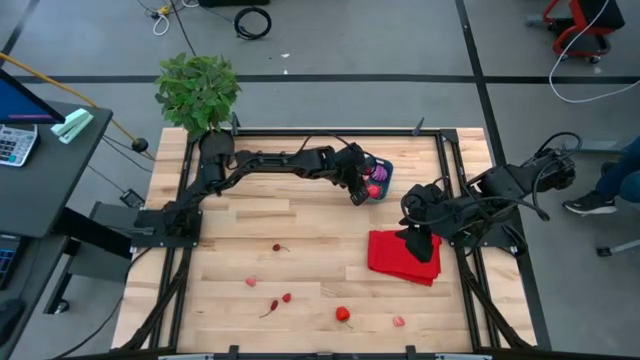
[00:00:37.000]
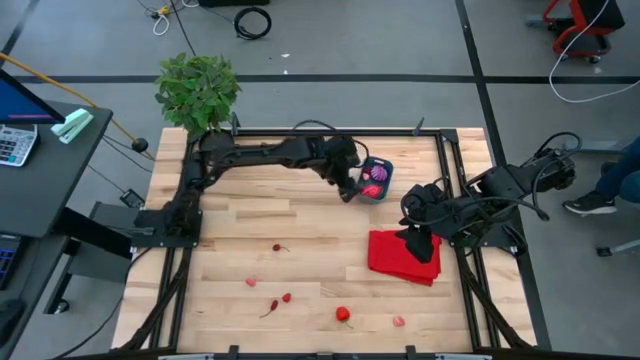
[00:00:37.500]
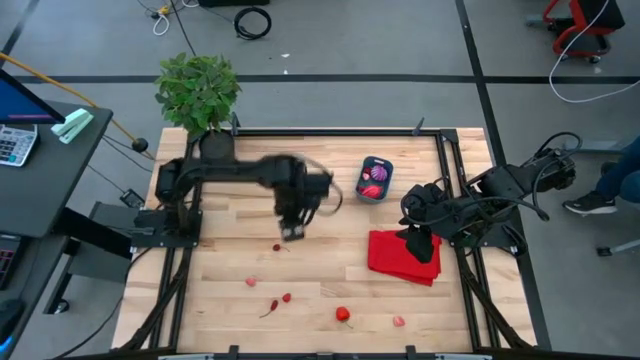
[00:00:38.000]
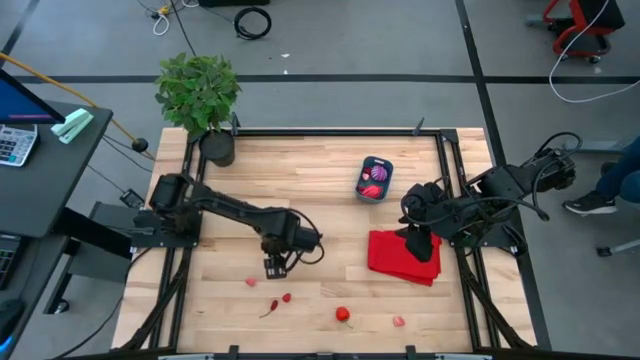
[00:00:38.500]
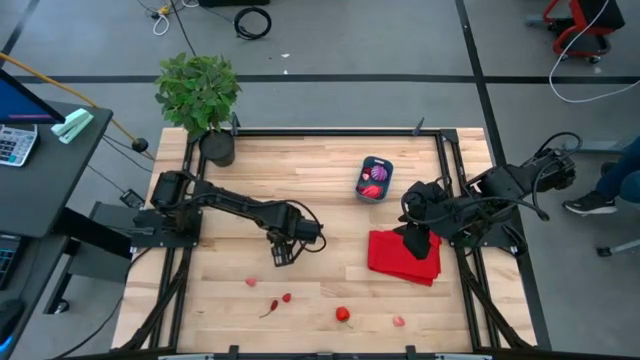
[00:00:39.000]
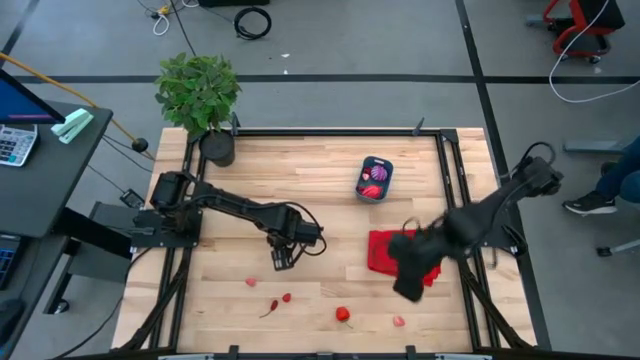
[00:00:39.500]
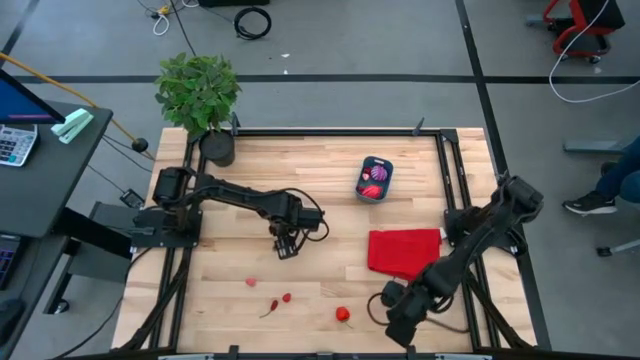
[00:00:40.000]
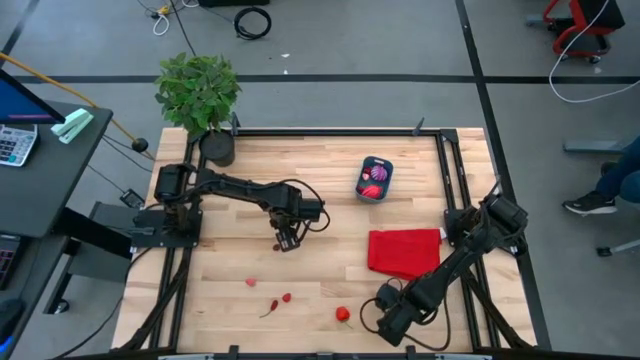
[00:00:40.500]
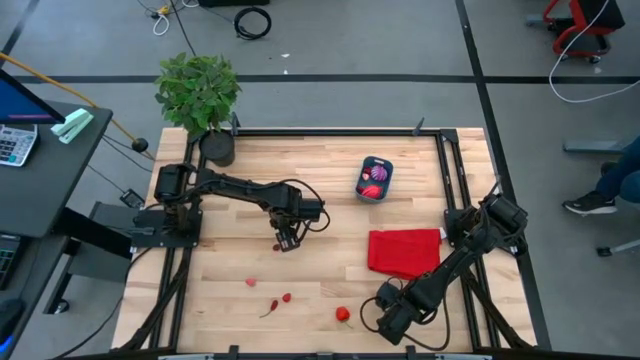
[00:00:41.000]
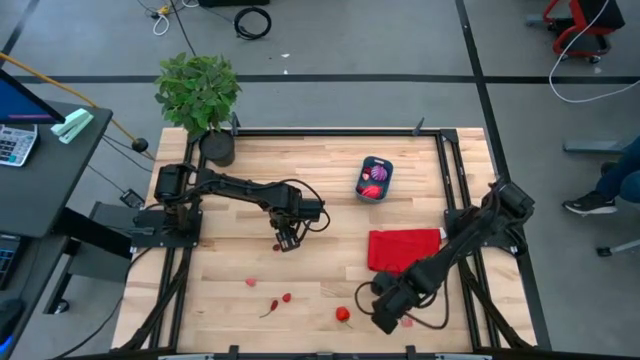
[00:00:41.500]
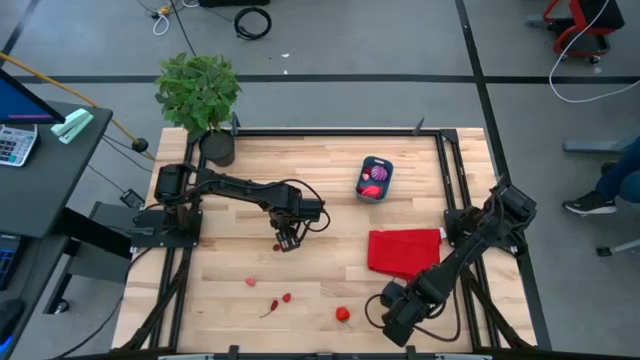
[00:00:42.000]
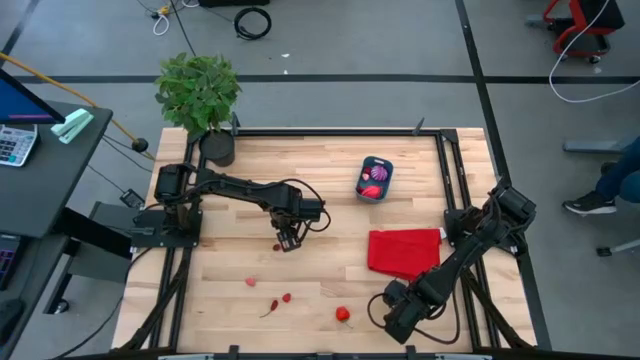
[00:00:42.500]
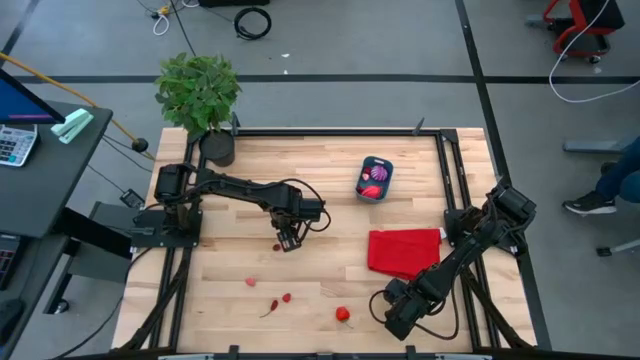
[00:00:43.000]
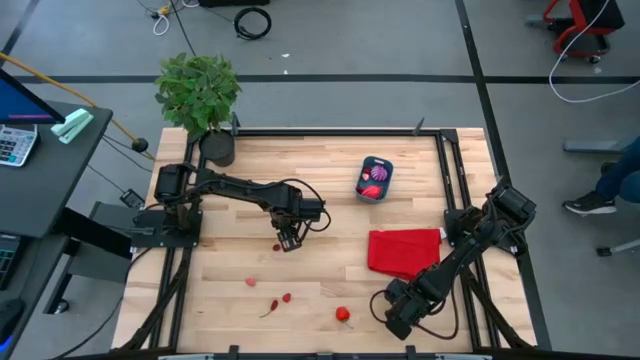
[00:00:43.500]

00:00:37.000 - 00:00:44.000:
Task: Pick and placing Produce into tupperware
Put the peach into the bin

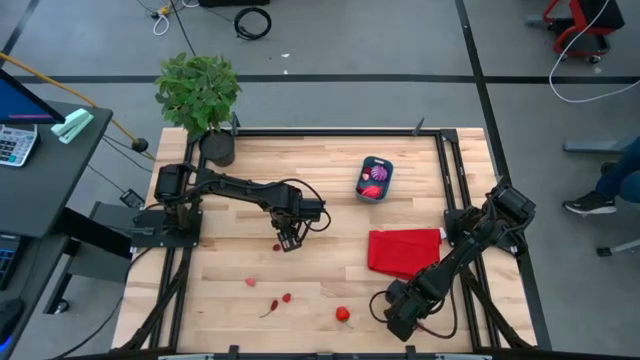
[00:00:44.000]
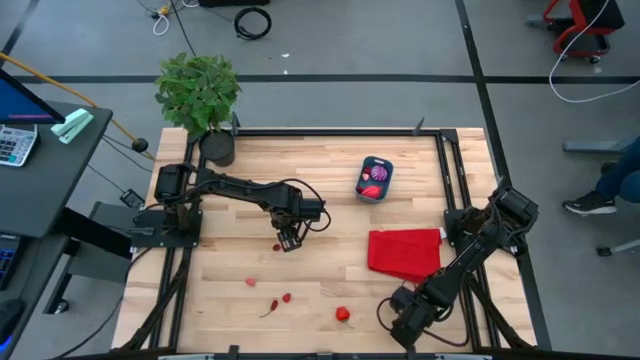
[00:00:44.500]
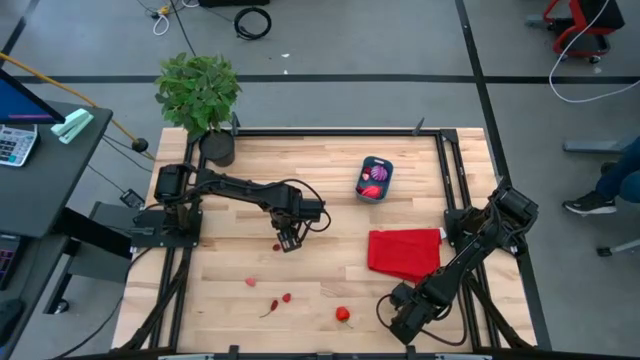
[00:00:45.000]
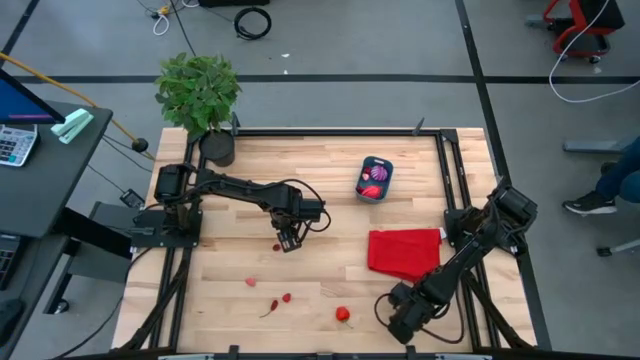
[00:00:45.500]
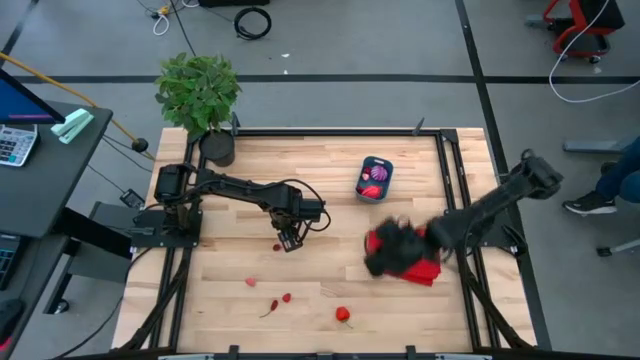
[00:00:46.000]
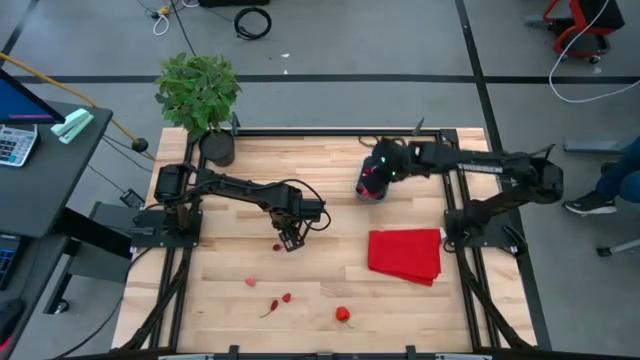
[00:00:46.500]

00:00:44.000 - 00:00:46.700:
Put the peach into the bin

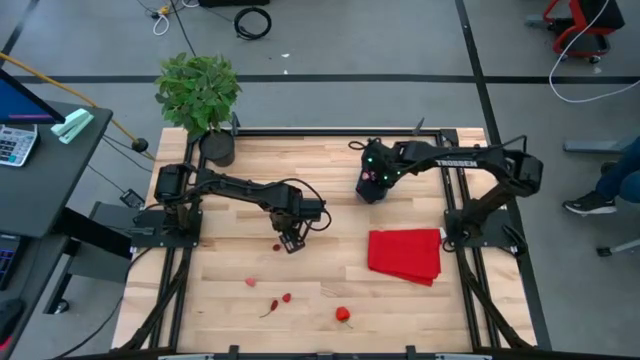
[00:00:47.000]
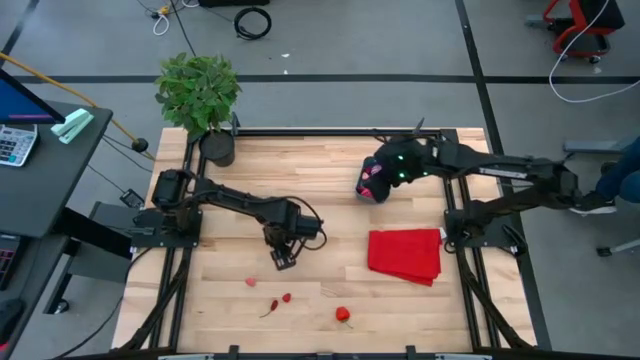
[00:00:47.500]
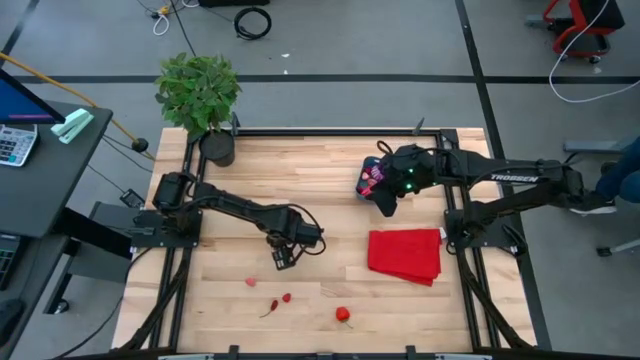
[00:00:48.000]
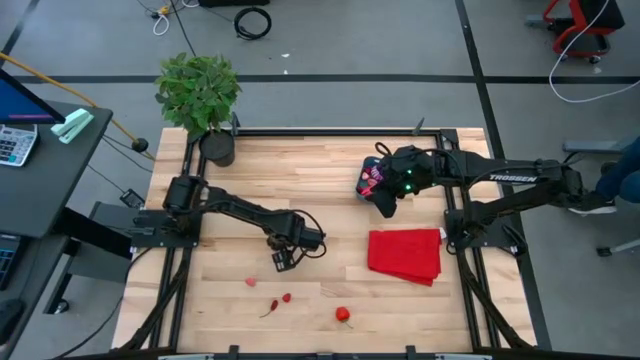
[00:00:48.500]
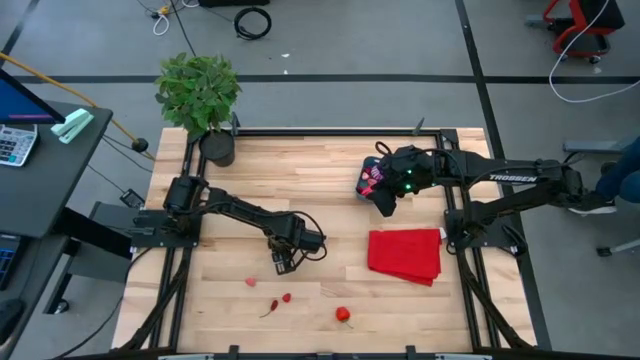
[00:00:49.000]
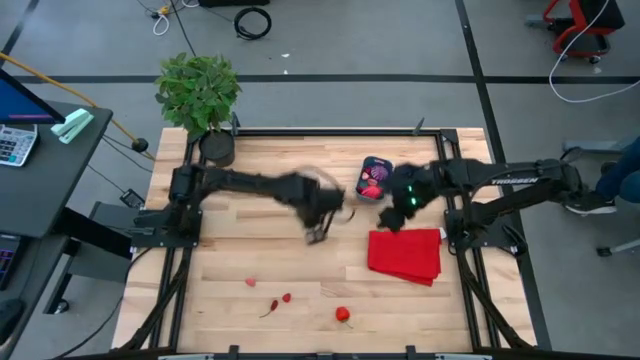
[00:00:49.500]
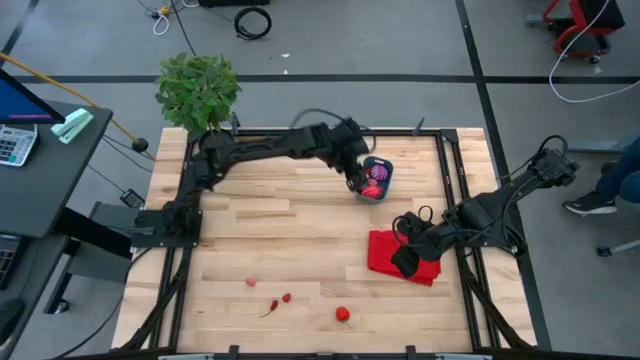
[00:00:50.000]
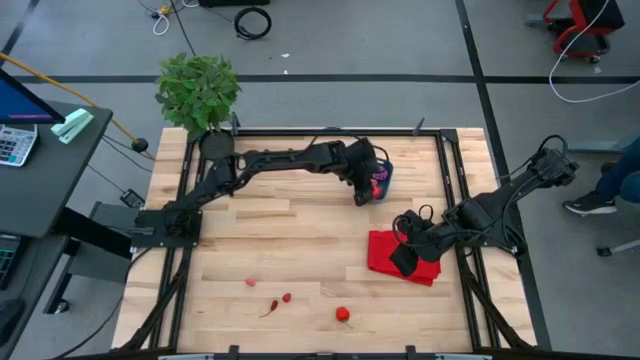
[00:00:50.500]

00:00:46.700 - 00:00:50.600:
Put the berry into the bin

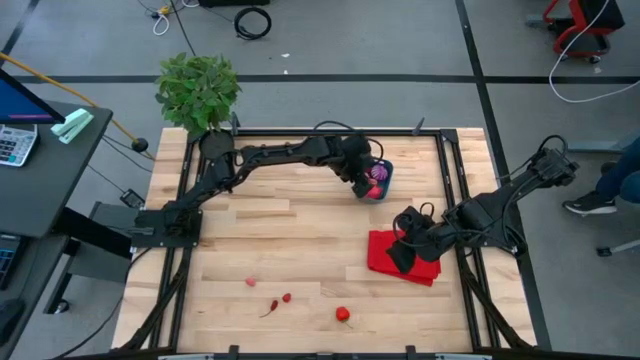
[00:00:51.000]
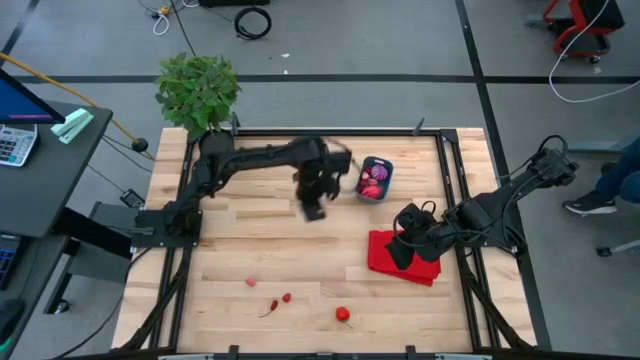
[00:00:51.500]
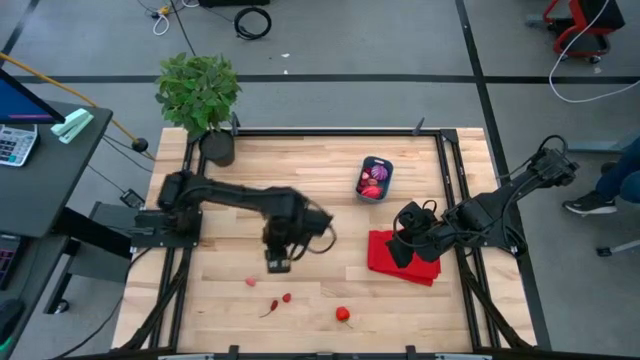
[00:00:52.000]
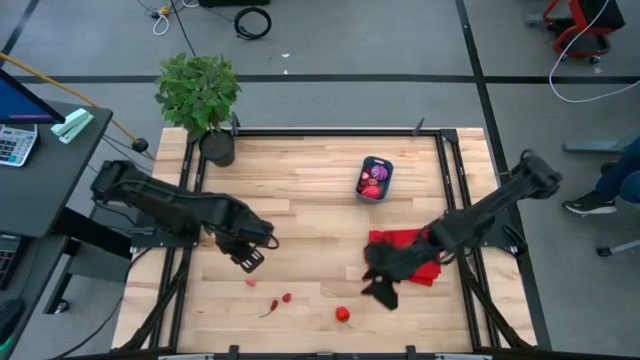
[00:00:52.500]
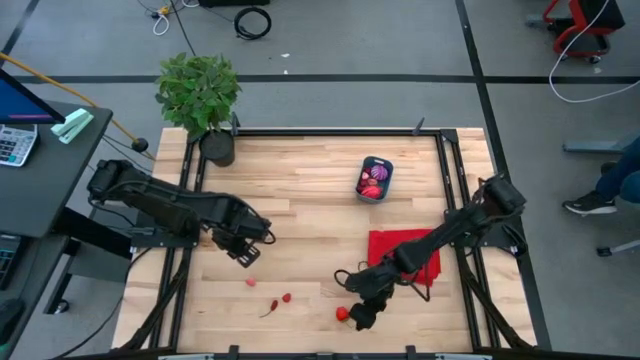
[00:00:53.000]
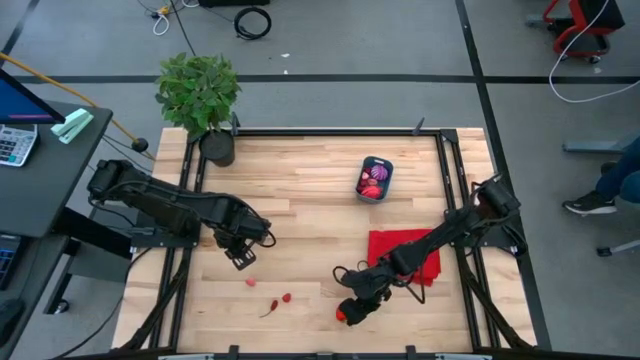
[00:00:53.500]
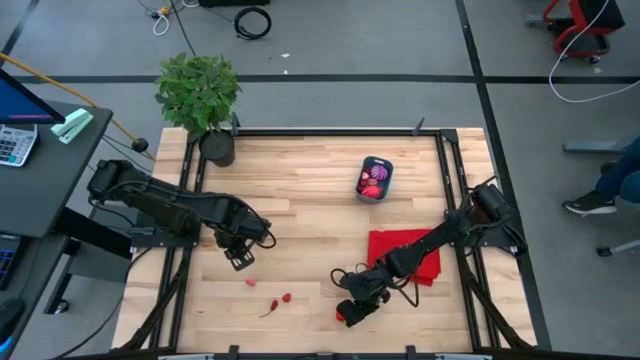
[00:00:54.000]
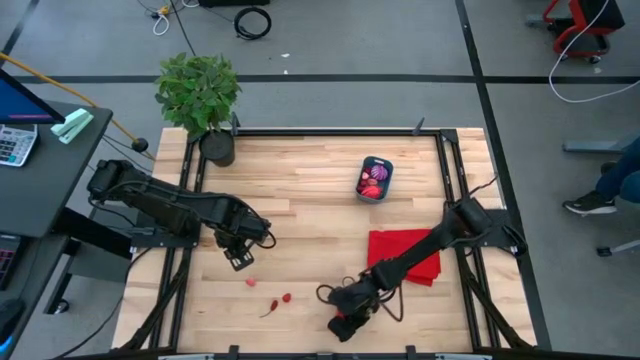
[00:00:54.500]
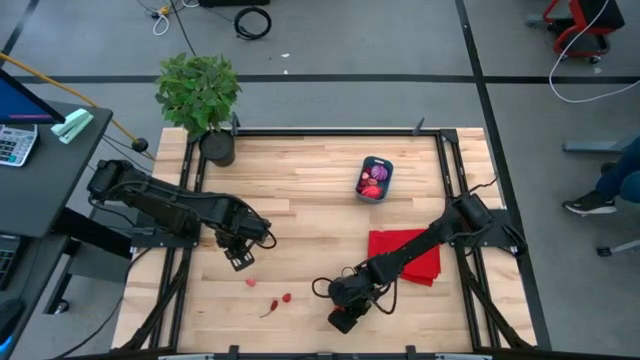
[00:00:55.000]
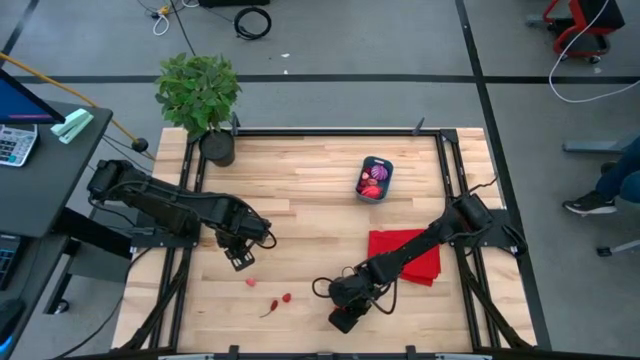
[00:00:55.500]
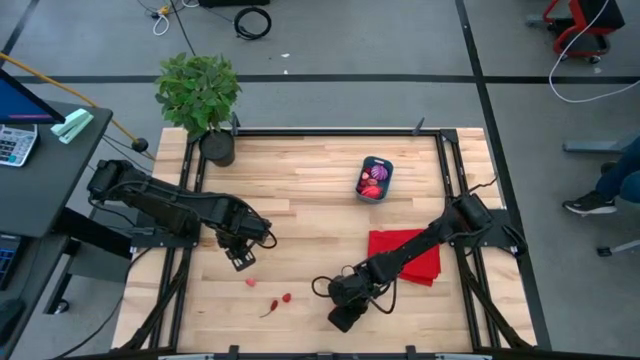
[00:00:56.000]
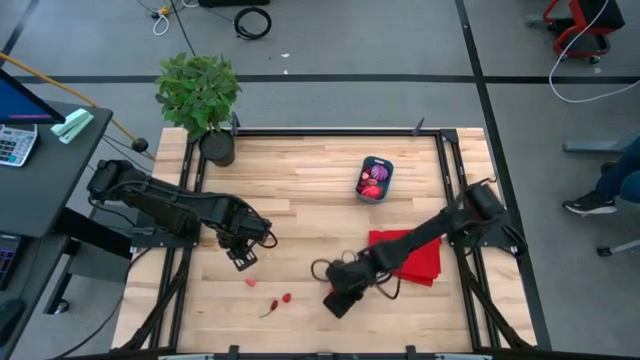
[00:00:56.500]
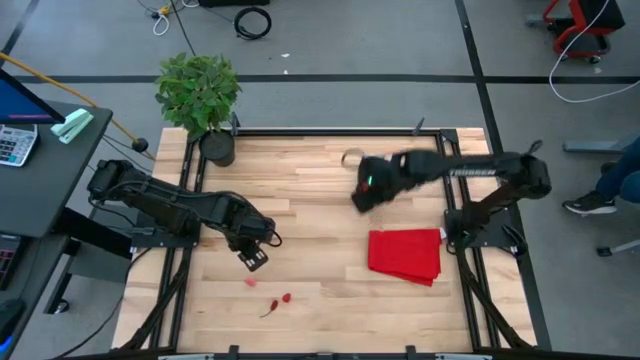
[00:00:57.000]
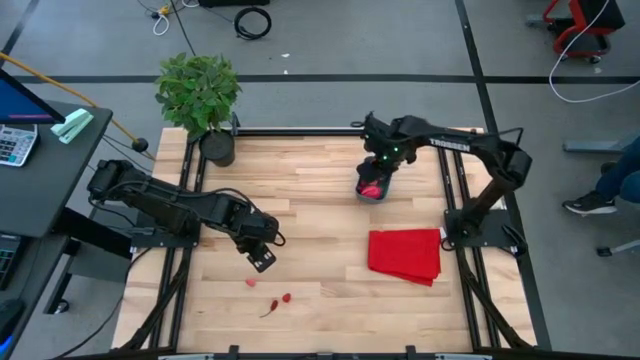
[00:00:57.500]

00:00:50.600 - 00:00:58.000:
Put the strawberry into the bin
